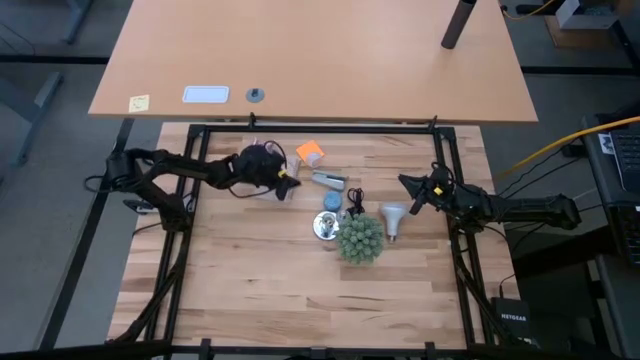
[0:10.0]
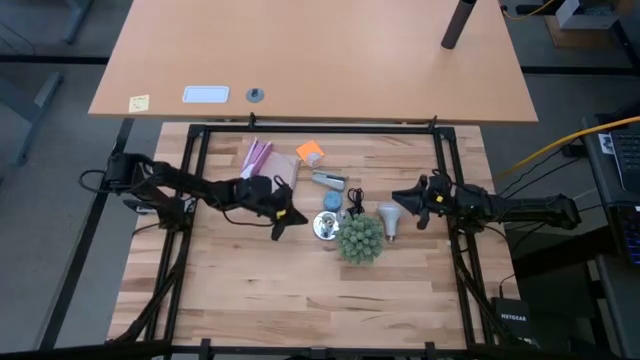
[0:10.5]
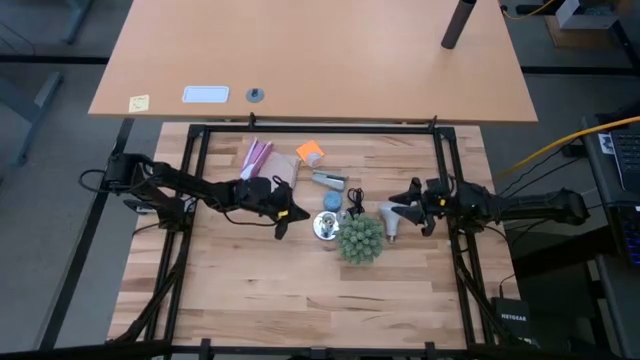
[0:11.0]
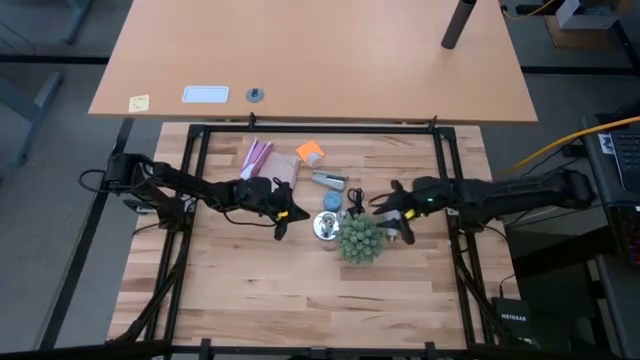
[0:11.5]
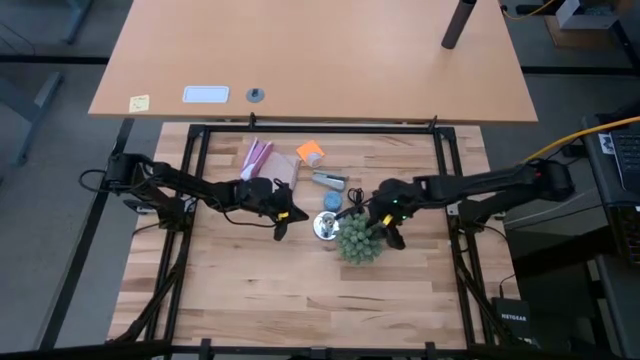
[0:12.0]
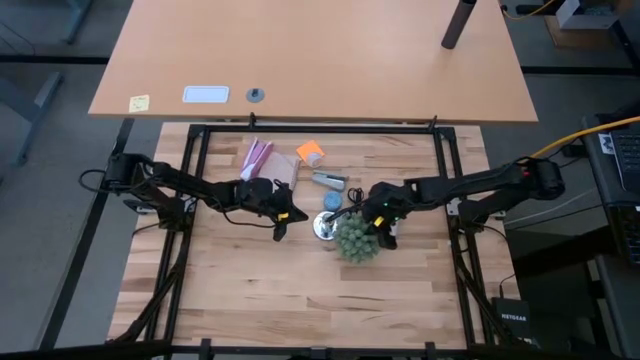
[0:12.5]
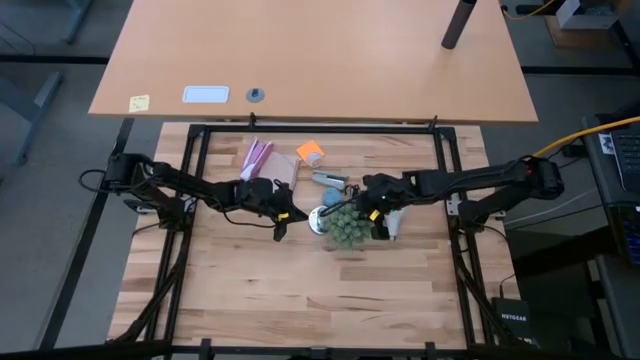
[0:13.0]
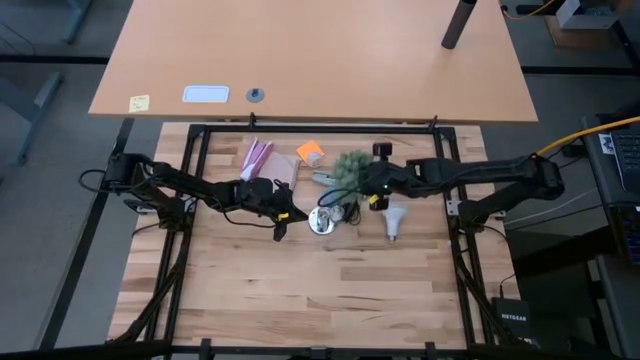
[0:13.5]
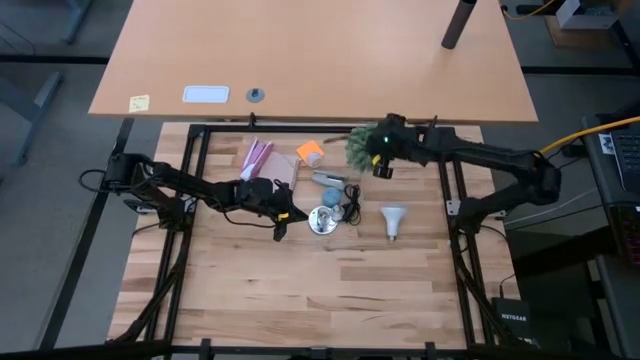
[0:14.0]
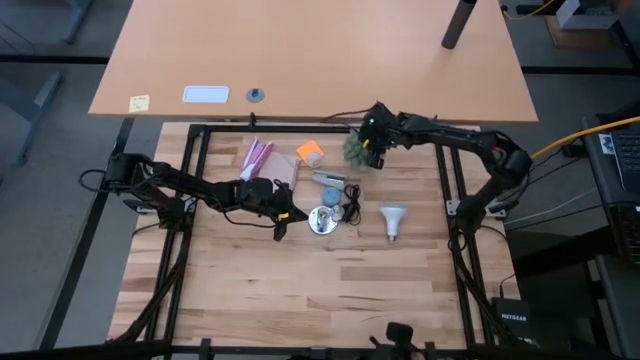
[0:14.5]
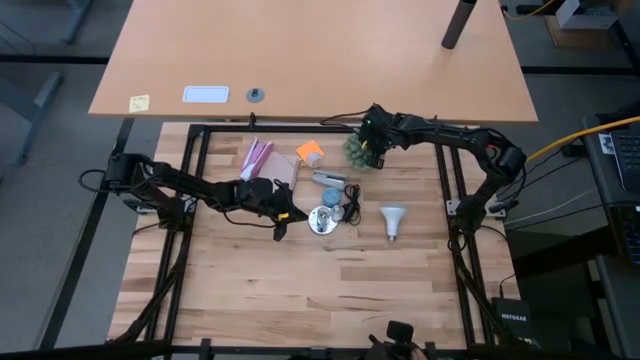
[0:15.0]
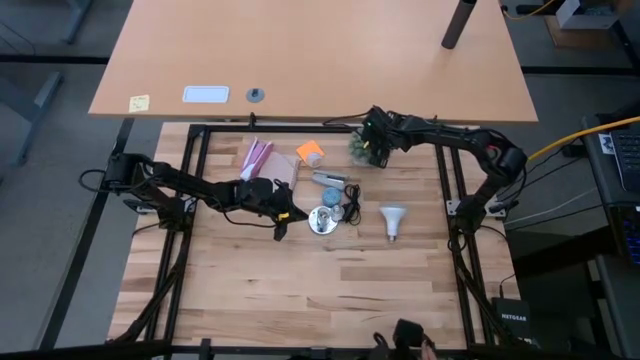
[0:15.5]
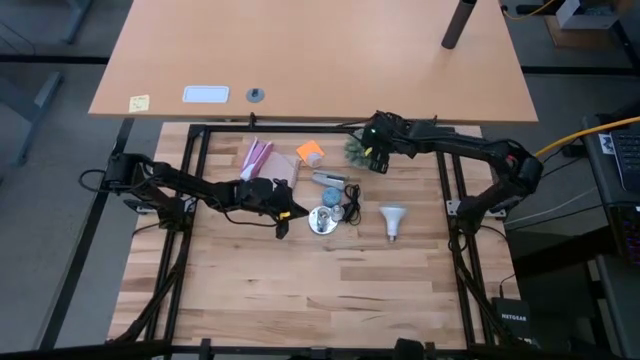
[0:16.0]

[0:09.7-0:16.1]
Task: Screw lightbulb
Move the green succulent plant to the top right of the table

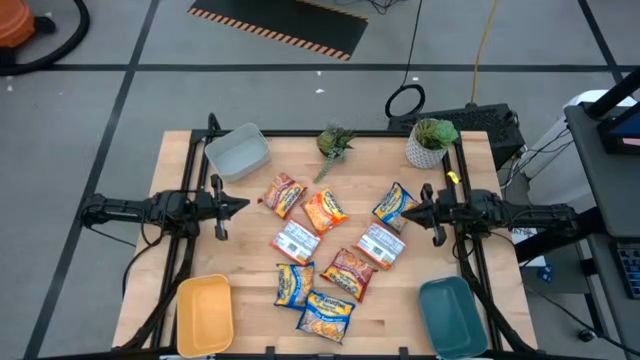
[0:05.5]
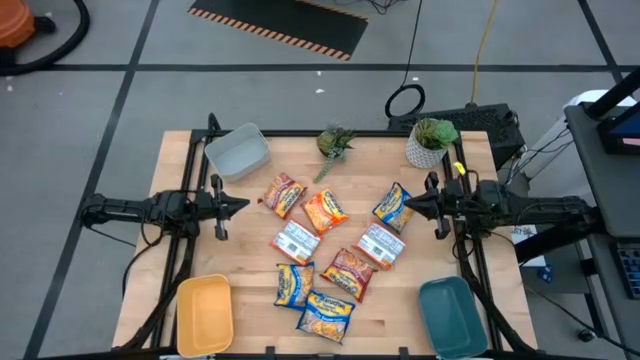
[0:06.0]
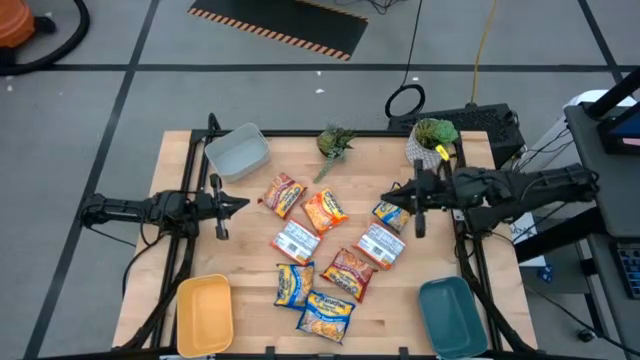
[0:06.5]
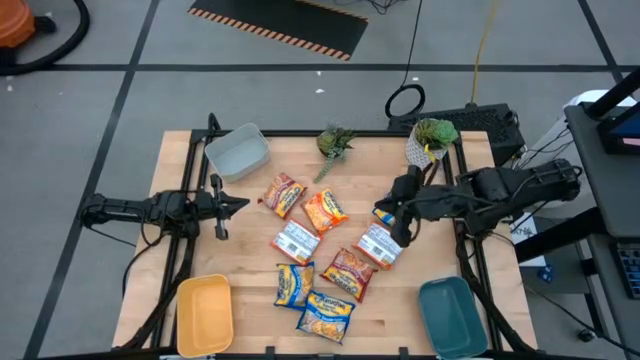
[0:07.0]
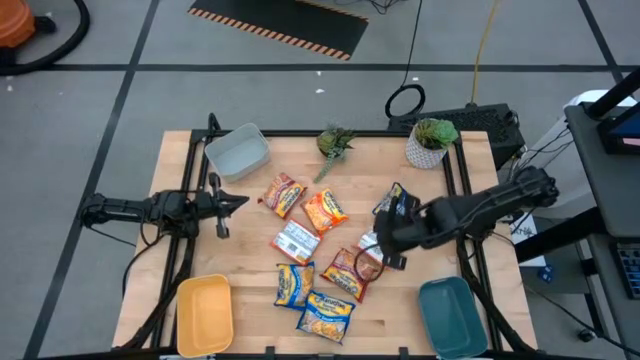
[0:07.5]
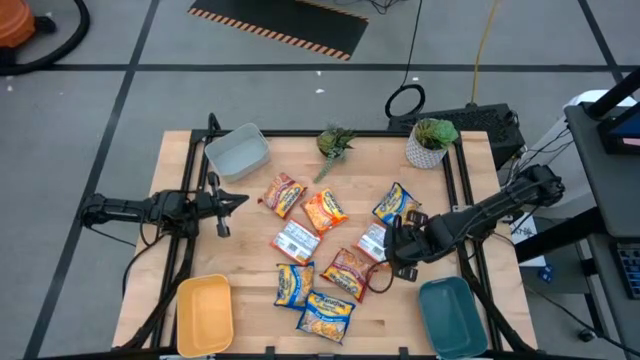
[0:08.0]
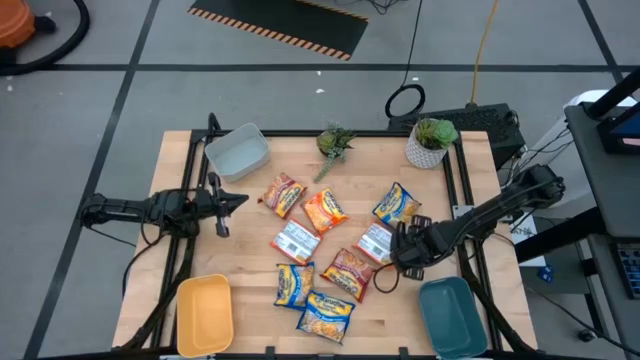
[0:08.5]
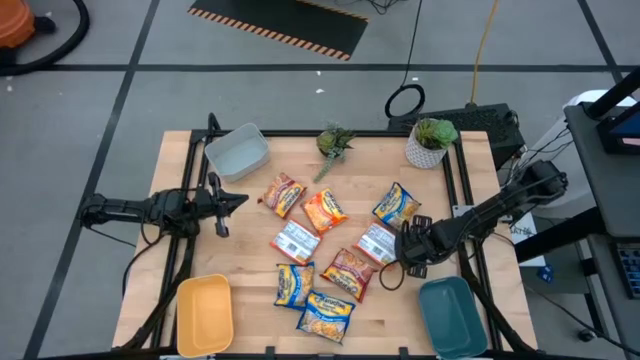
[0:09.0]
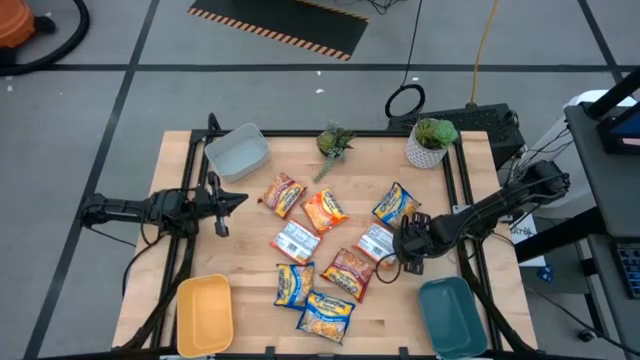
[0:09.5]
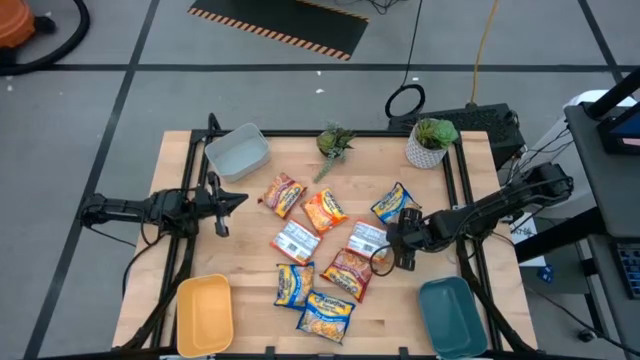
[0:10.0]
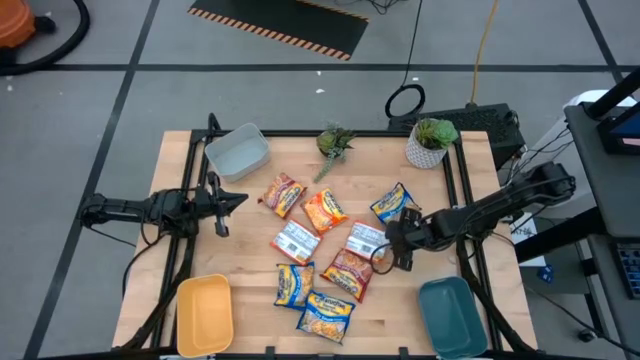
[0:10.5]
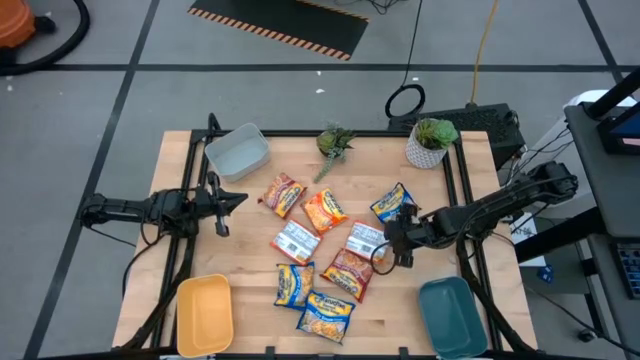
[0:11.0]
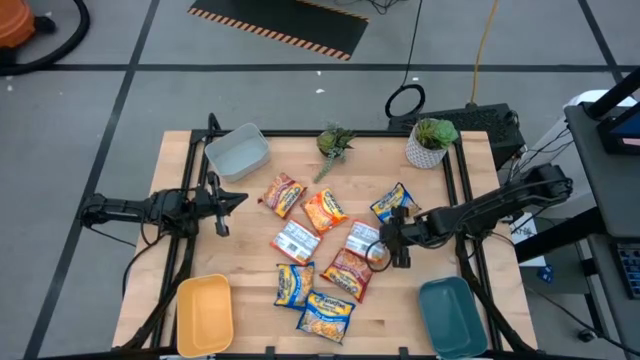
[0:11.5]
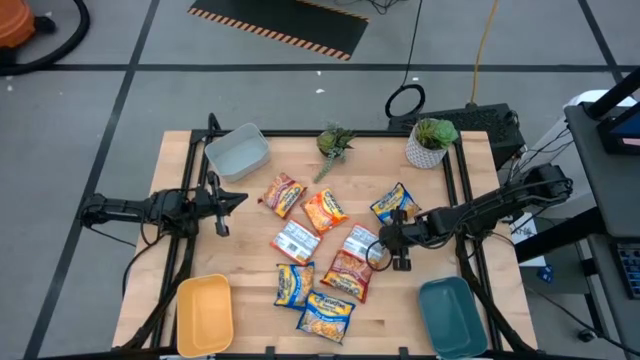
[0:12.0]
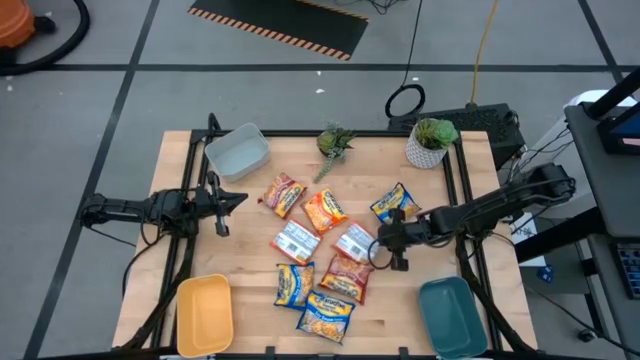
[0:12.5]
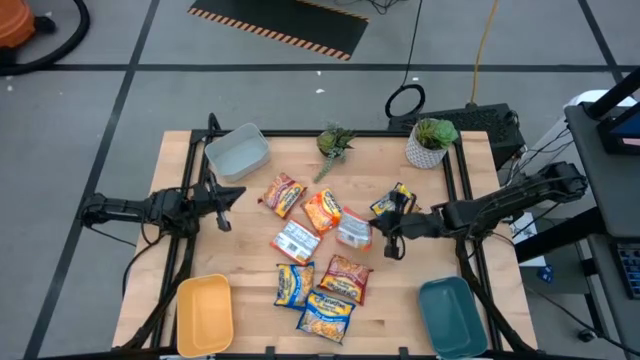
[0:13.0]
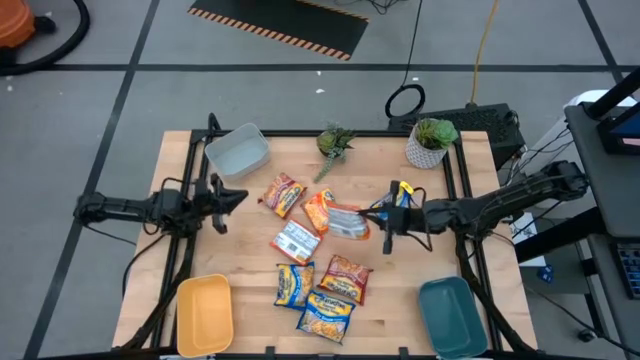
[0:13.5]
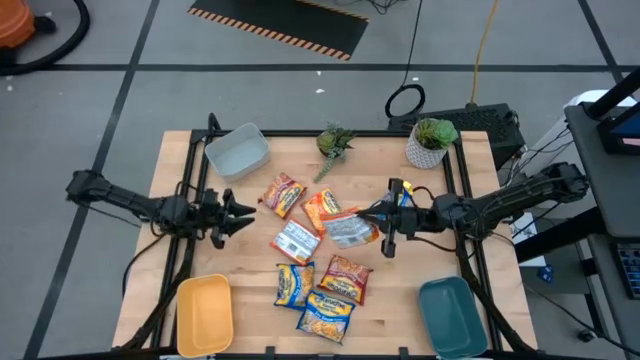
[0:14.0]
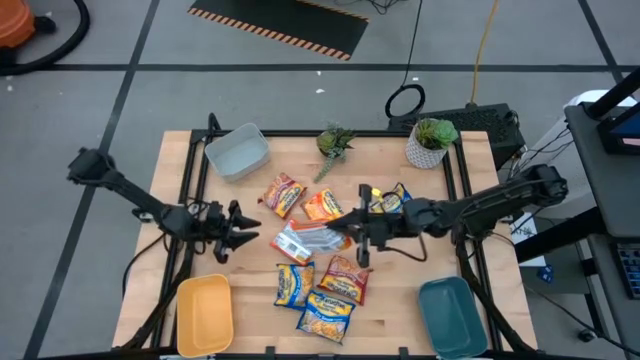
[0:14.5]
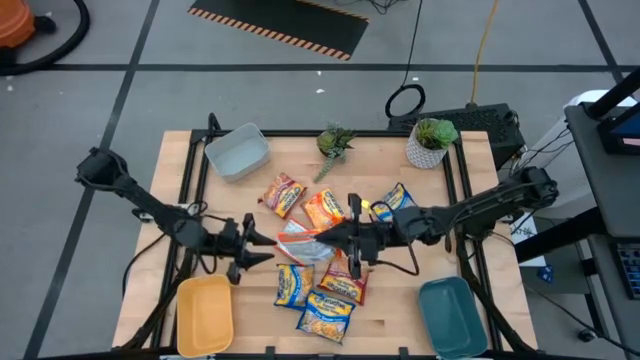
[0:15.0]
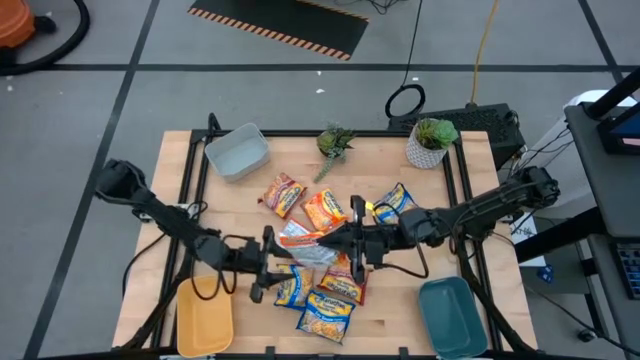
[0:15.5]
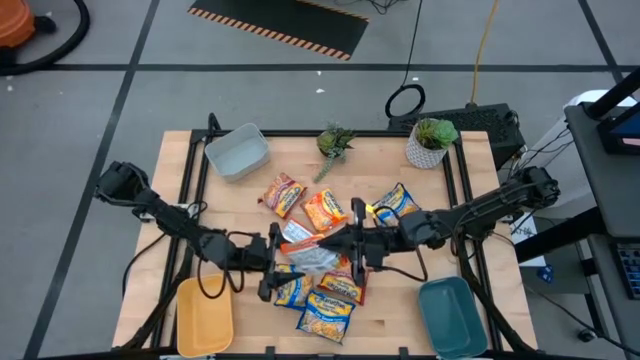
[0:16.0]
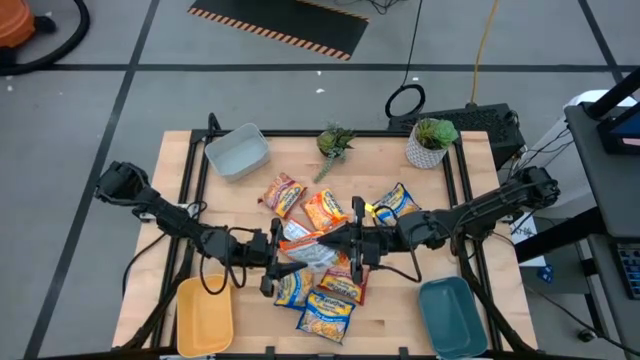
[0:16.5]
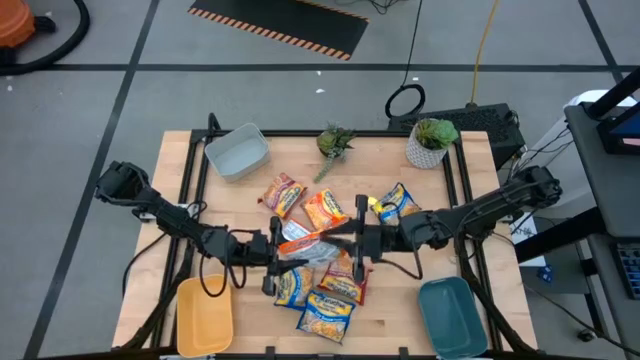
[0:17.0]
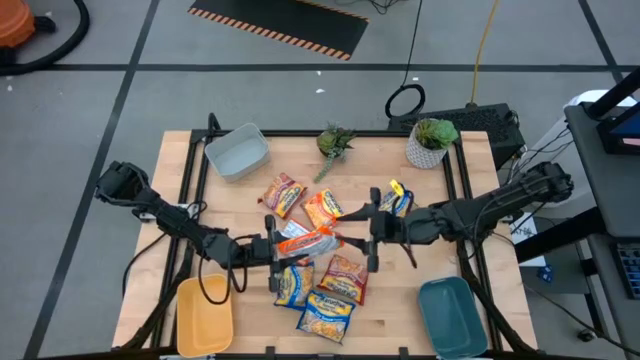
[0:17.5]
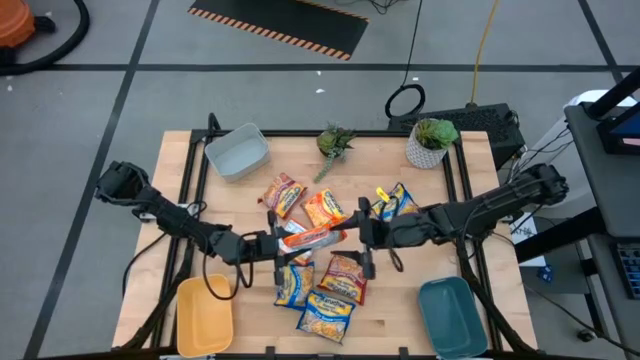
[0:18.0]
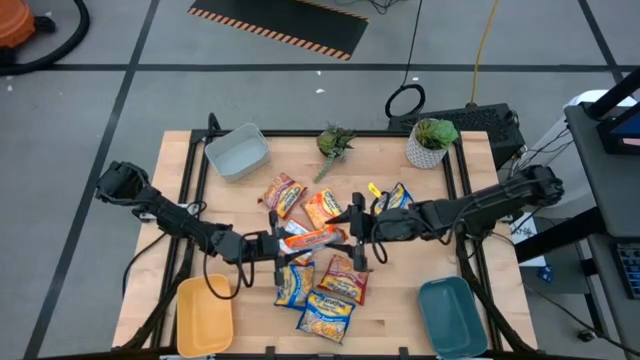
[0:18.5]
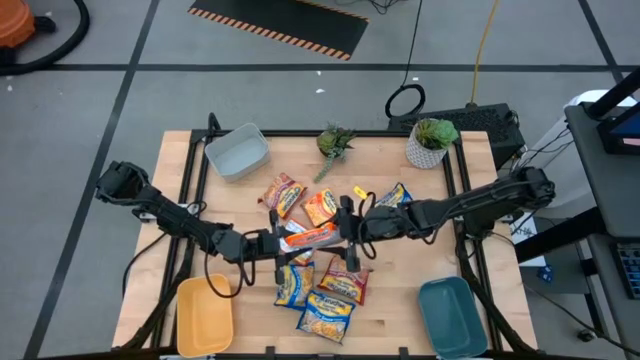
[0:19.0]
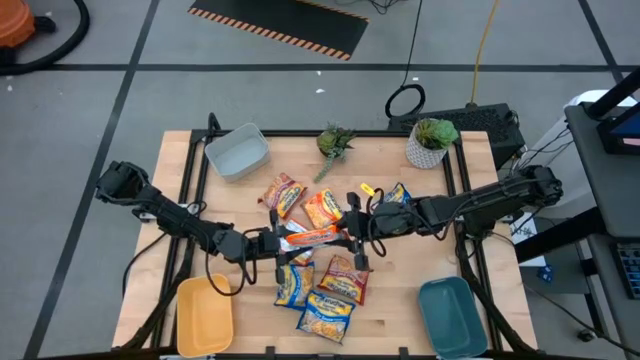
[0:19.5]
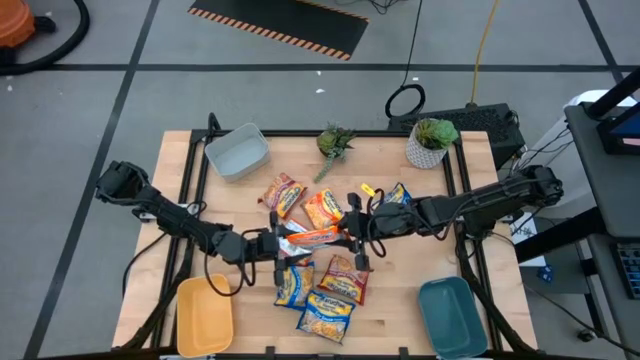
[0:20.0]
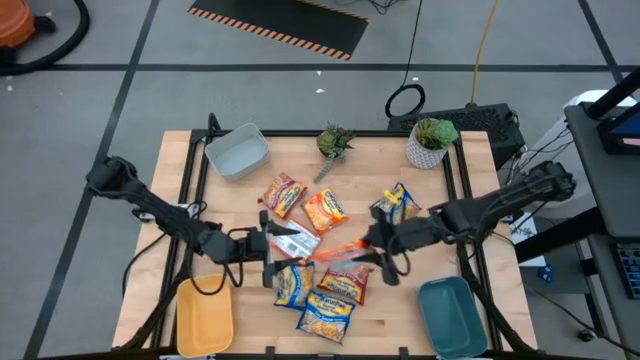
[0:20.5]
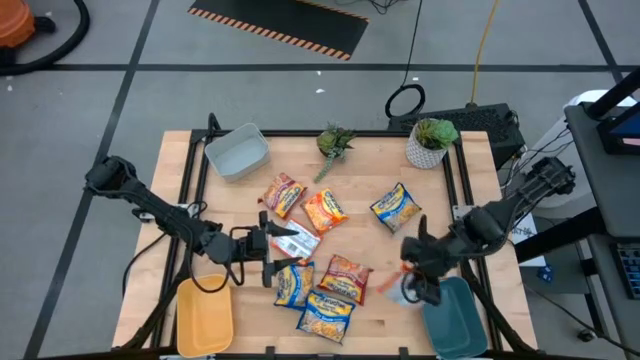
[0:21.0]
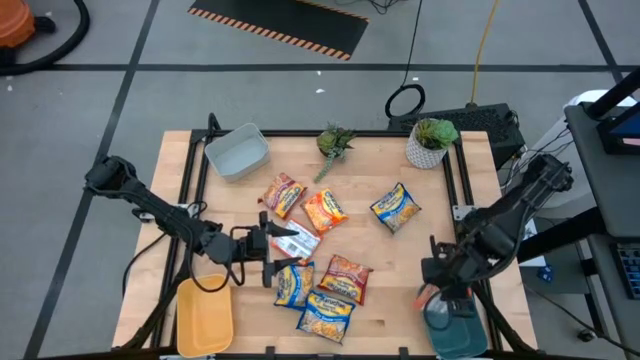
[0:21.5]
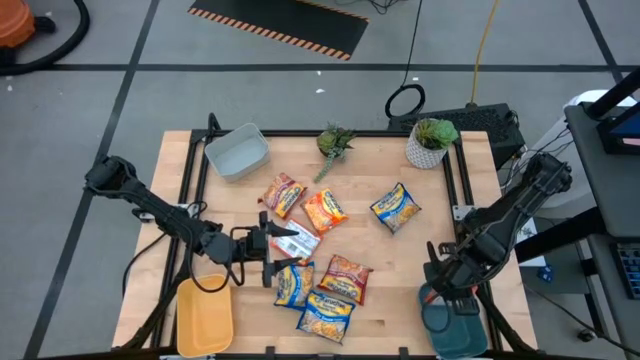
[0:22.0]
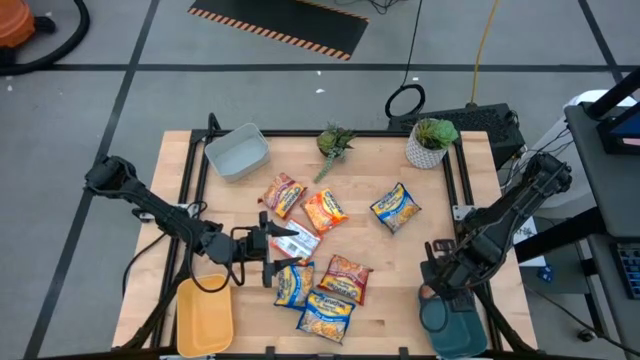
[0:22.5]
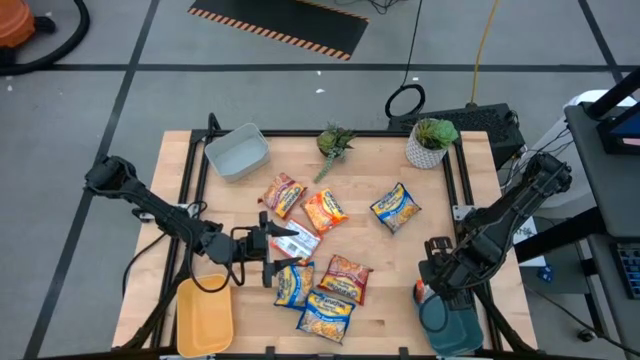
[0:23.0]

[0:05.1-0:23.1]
Task: Sort Maruchan noodles
Put the right orange noodle pack into the blue bin
